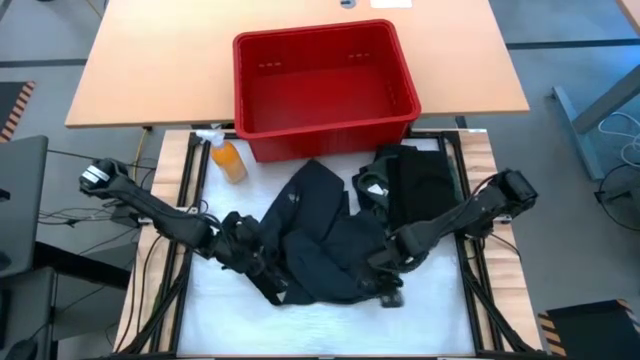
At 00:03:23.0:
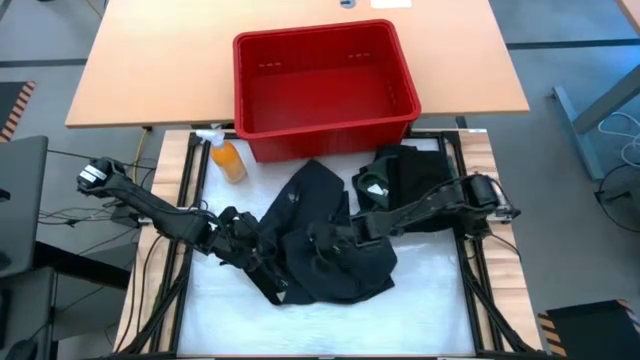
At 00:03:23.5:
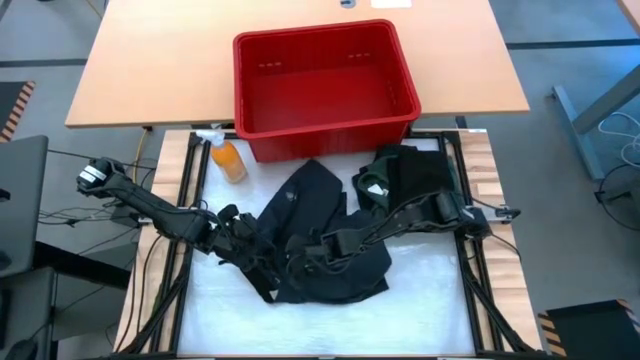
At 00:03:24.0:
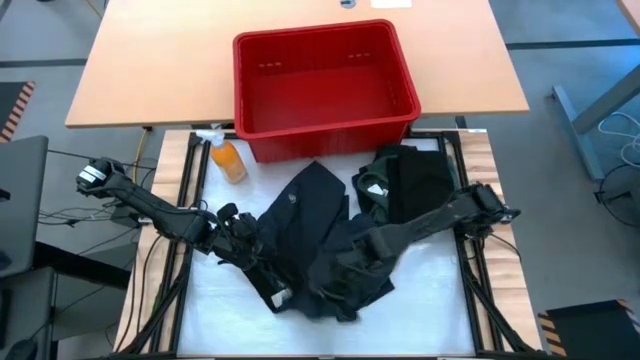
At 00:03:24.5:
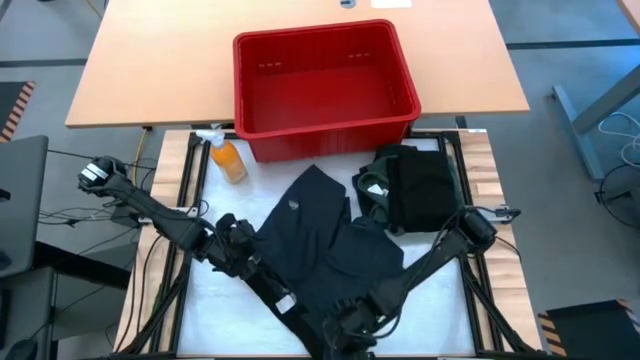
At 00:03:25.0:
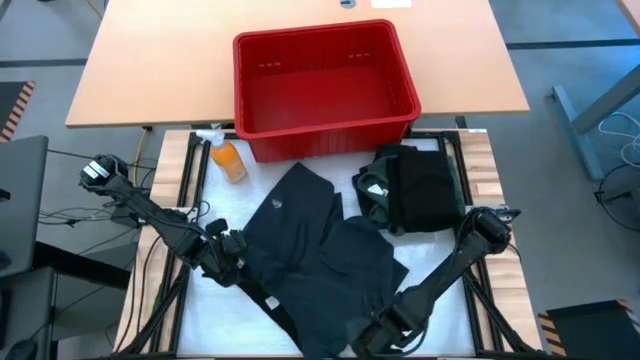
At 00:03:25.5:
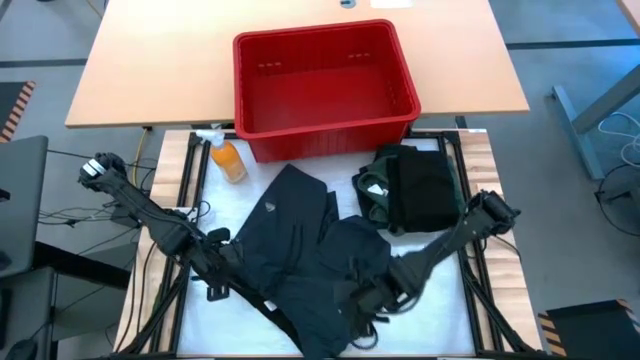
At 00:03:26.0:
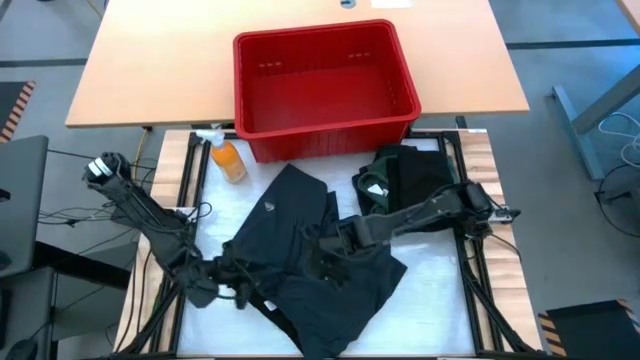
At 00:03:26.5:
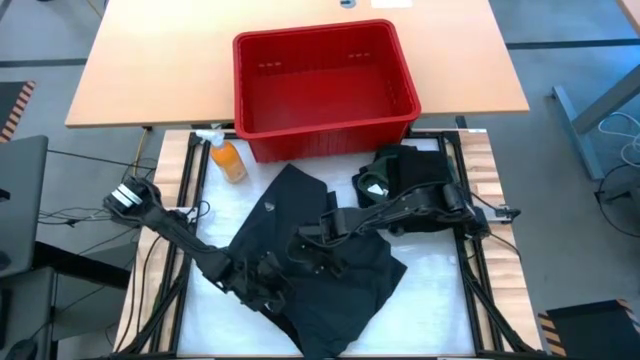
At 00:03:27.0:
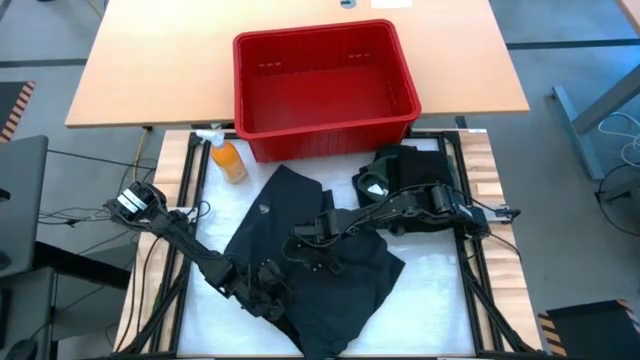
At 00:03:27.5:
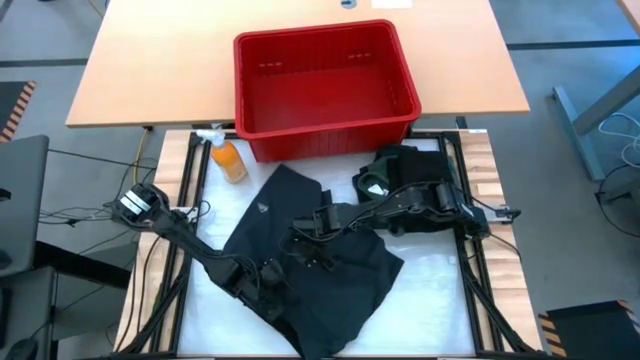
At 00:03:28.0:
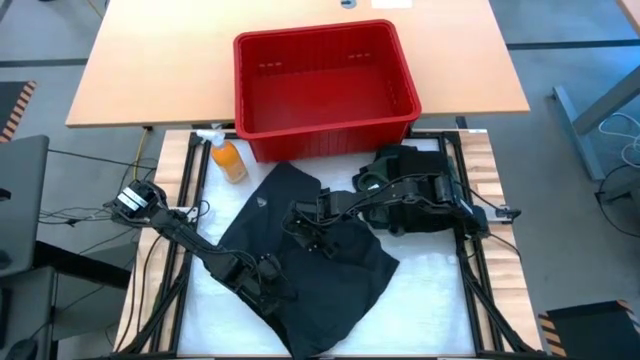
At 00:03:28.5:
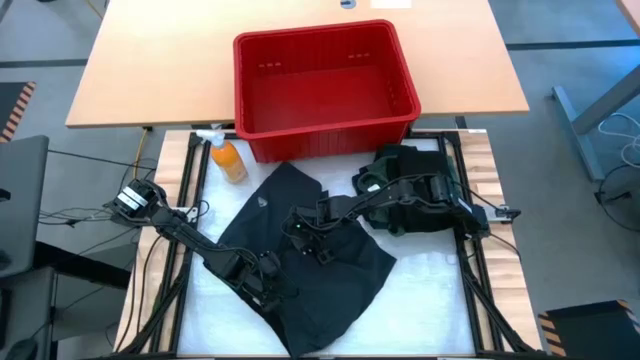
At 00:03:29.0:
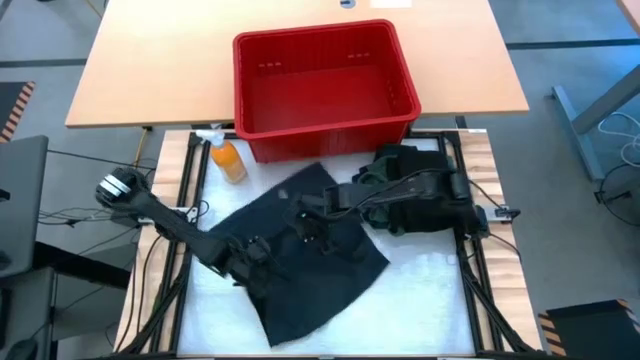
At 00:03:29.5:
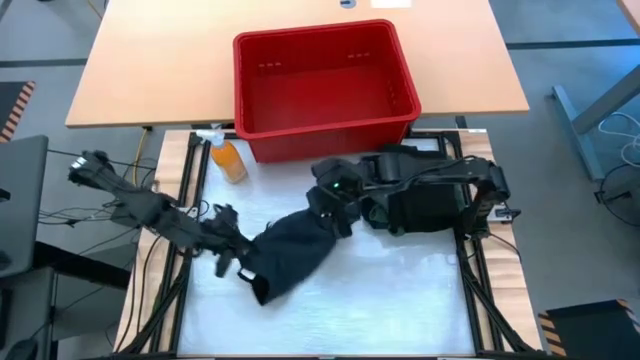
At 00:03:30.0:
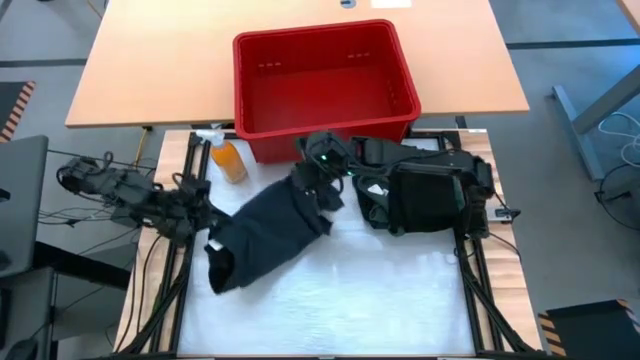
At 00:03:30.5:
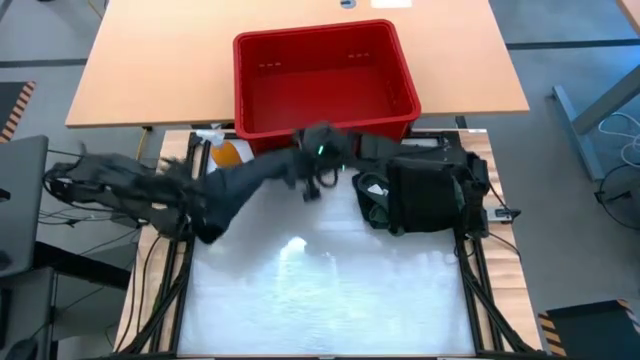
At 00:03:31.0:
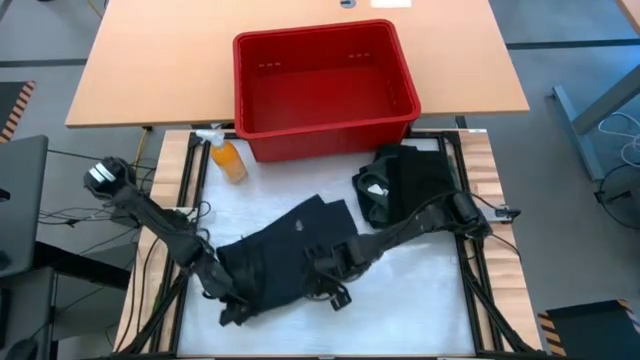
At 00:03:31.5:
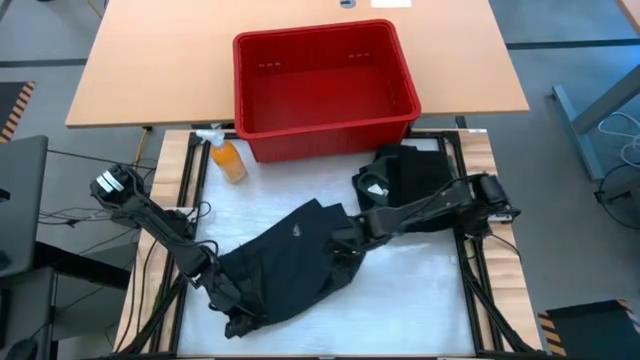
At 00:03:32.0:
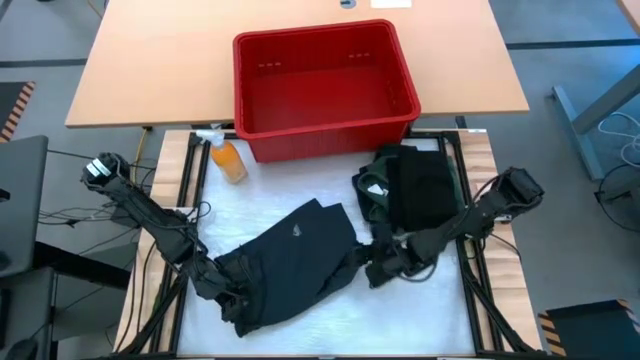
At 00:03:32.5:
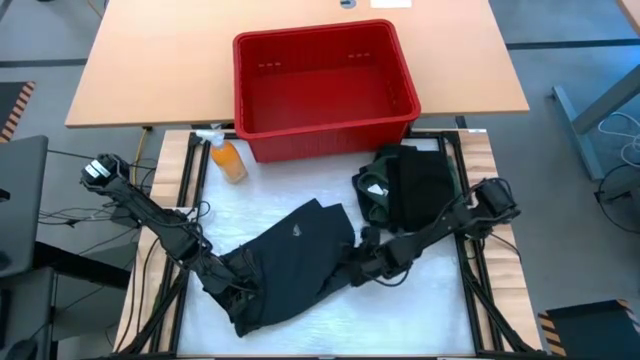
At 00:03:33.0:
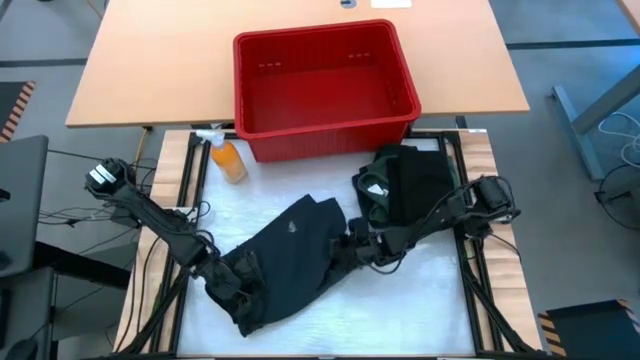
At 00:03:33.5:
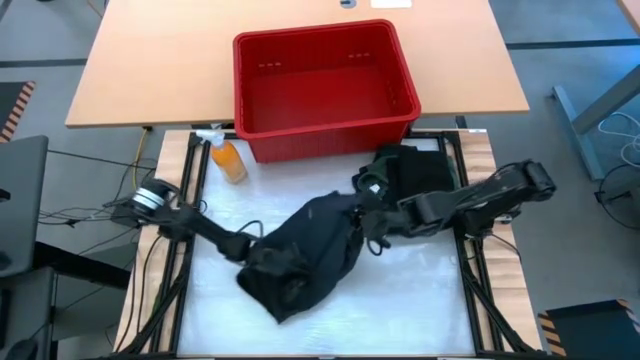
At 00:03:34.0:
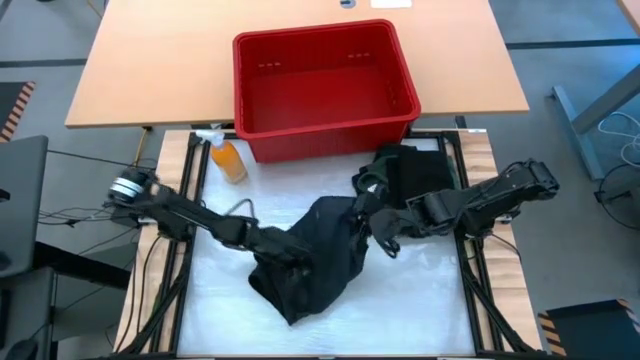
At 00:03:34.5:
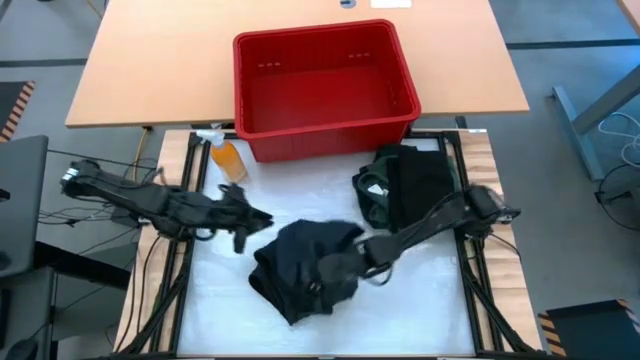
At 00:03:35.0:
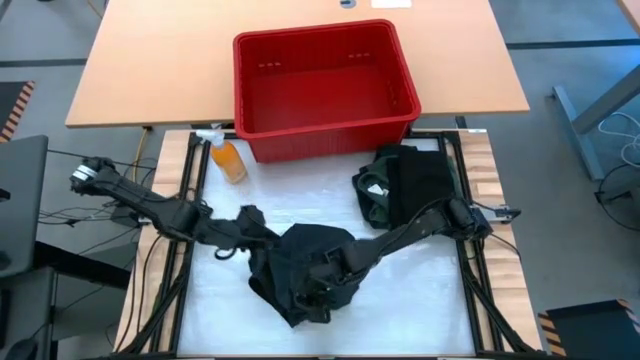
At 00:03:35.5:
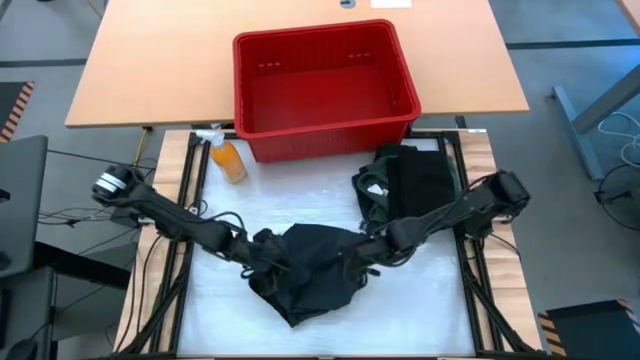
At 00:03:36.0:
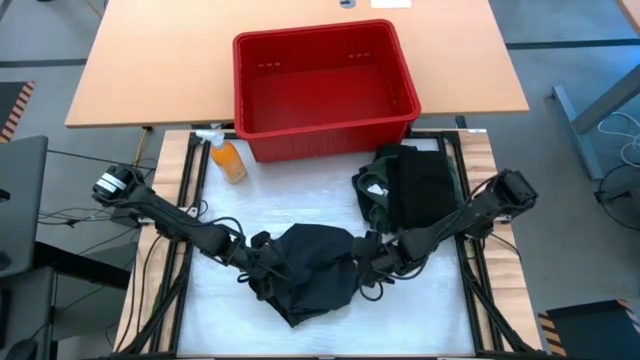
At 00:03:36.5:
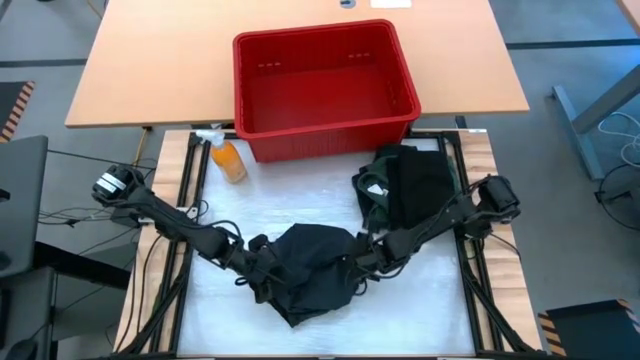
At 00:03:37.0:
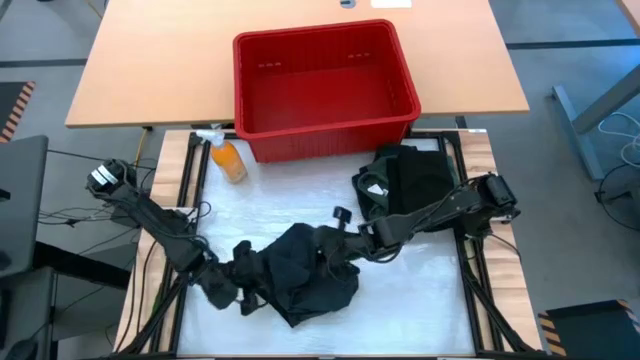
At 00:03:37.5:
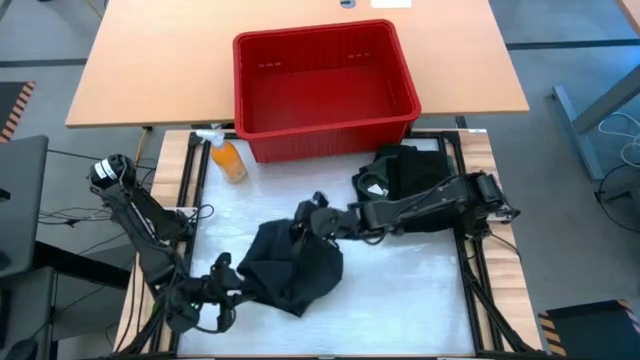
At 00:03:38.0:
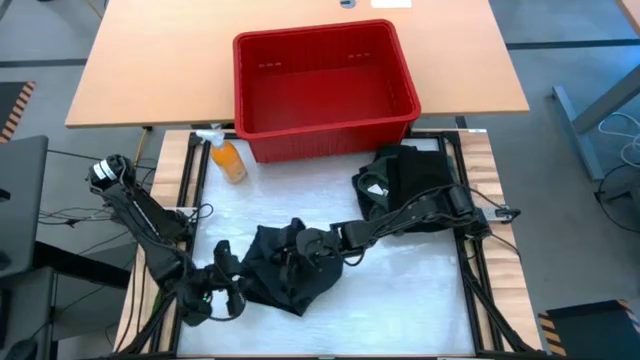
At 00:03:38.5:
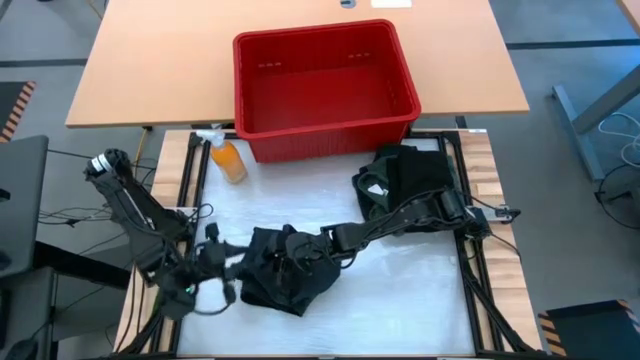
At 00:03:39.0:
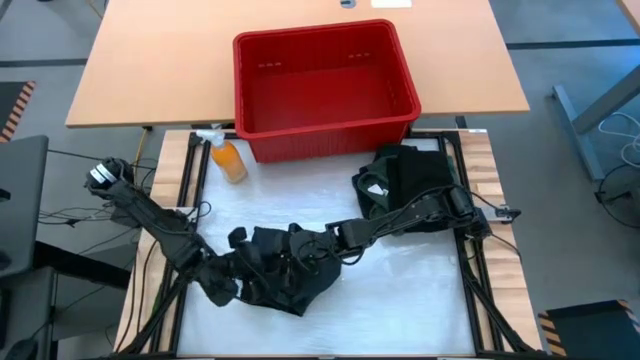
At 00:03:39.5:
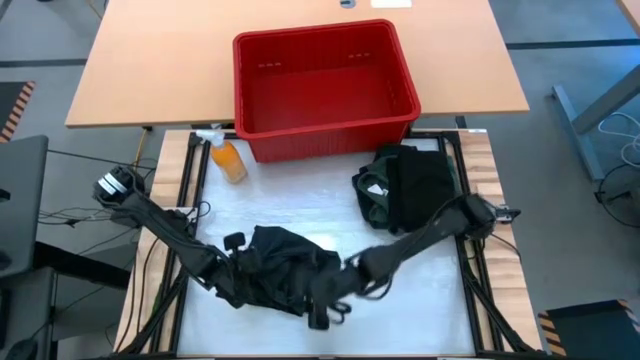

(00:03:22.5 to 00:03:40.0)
Task: Fold laundry
Fold the black shorts
